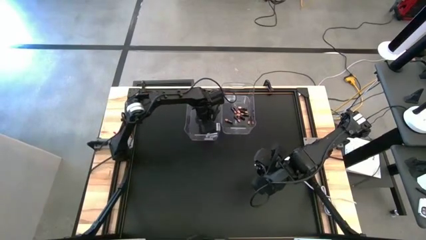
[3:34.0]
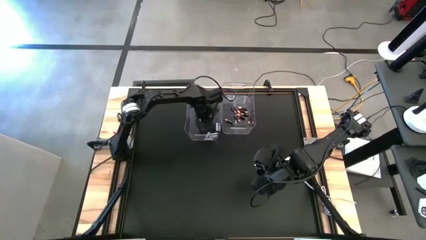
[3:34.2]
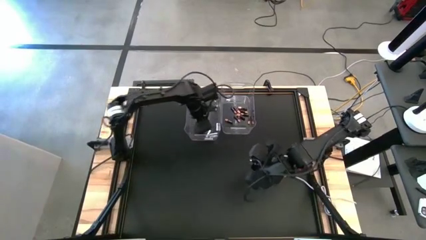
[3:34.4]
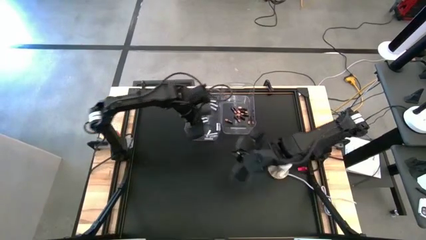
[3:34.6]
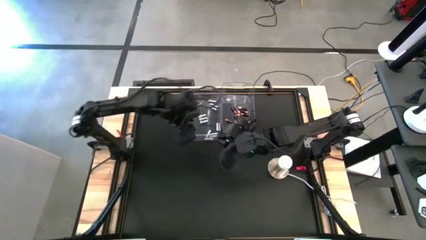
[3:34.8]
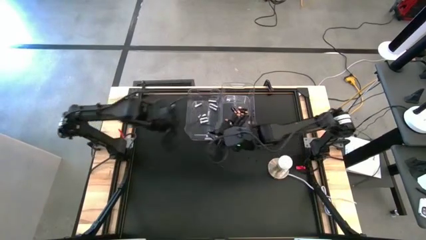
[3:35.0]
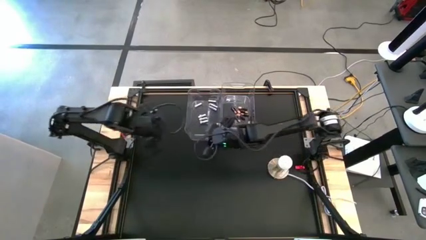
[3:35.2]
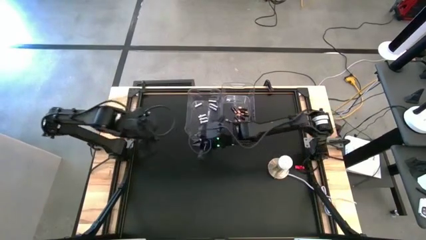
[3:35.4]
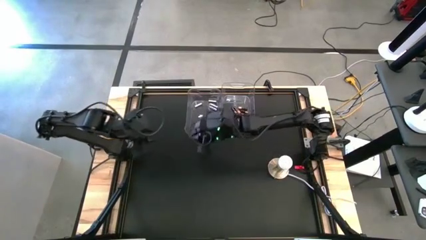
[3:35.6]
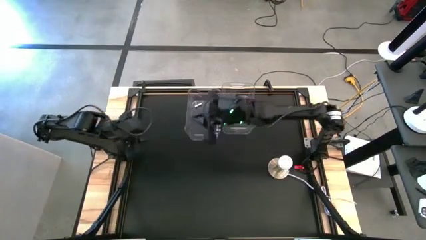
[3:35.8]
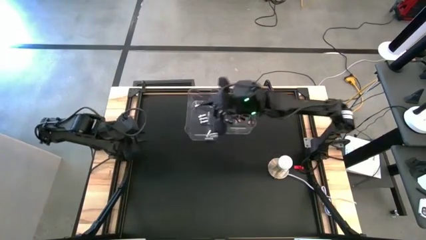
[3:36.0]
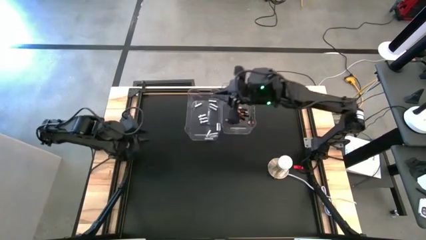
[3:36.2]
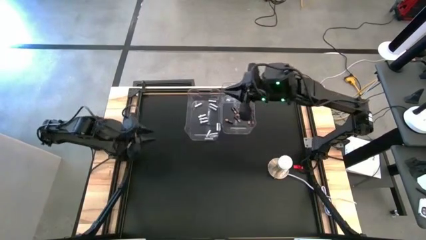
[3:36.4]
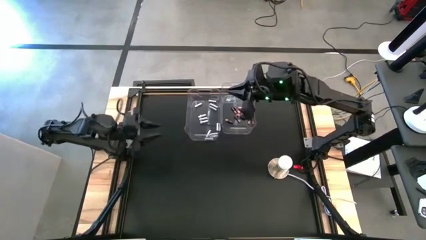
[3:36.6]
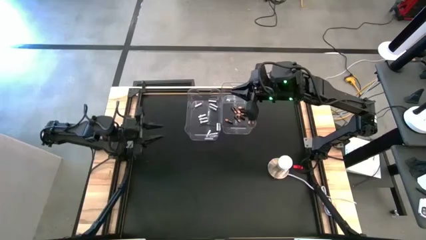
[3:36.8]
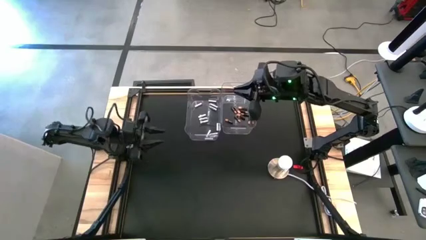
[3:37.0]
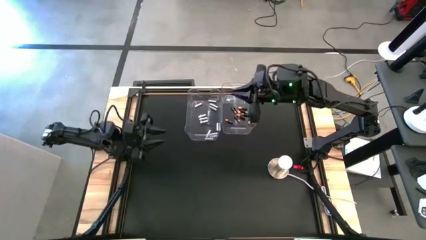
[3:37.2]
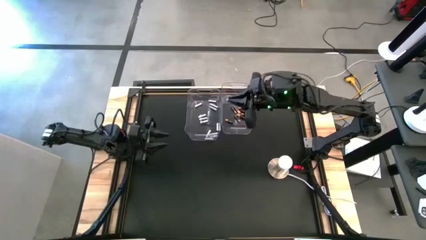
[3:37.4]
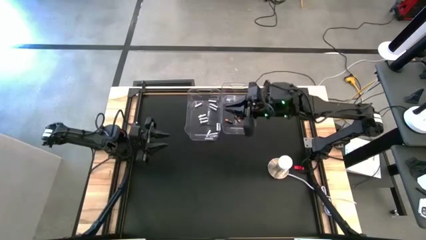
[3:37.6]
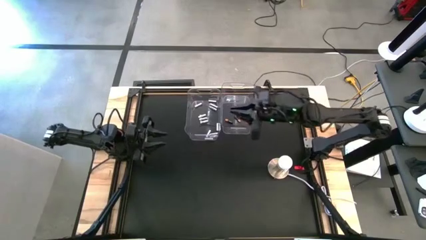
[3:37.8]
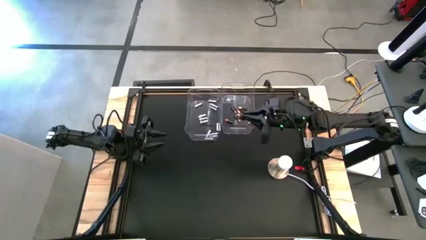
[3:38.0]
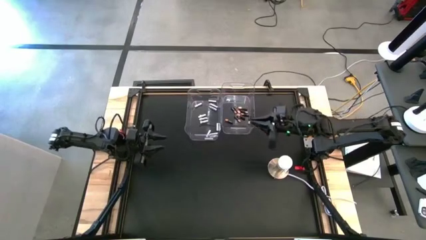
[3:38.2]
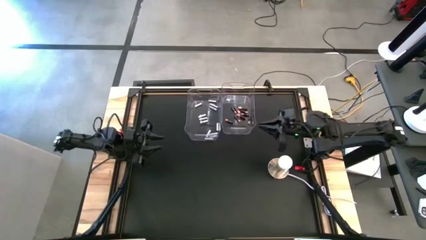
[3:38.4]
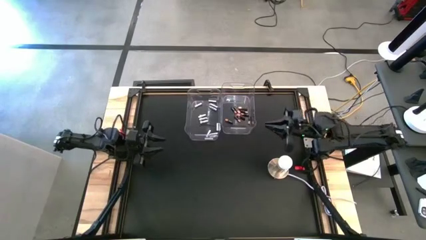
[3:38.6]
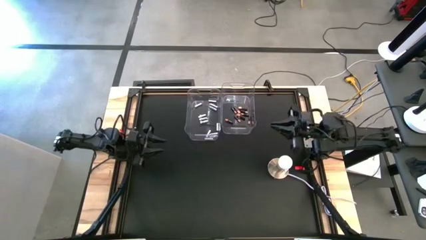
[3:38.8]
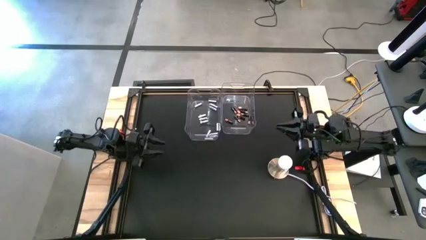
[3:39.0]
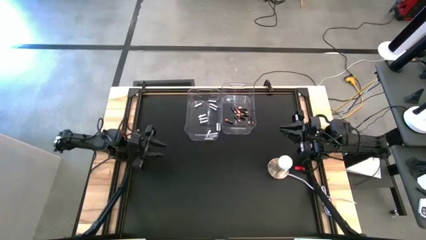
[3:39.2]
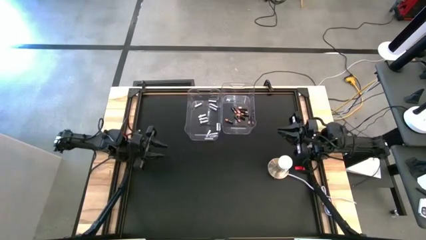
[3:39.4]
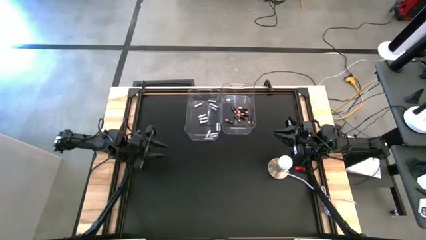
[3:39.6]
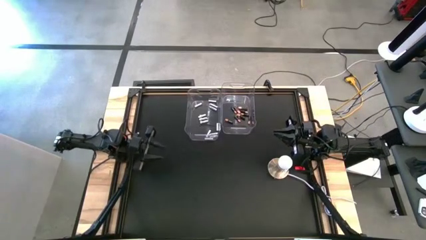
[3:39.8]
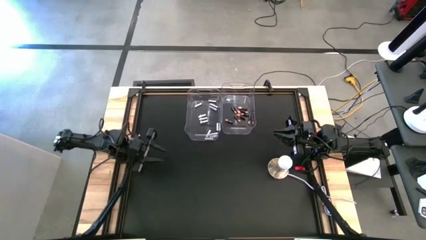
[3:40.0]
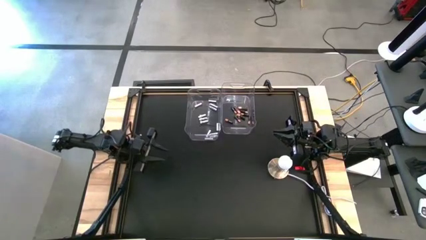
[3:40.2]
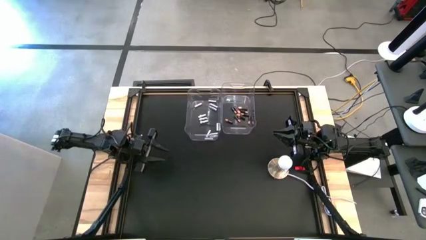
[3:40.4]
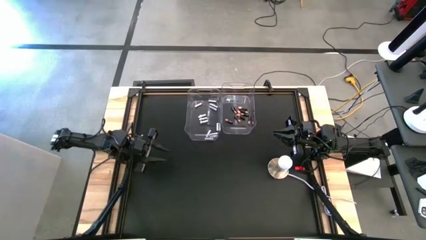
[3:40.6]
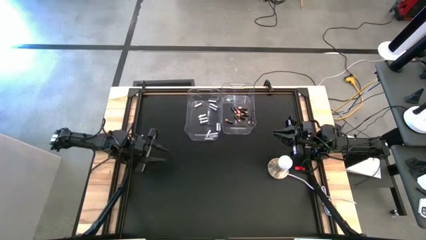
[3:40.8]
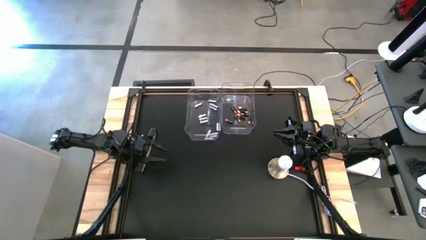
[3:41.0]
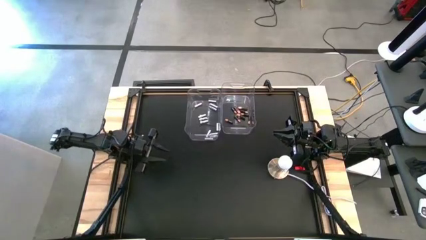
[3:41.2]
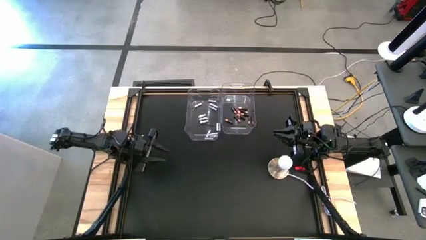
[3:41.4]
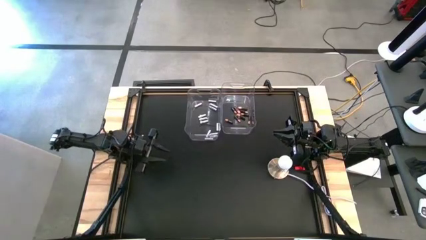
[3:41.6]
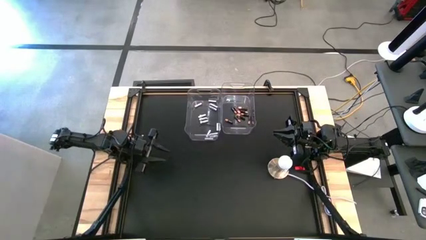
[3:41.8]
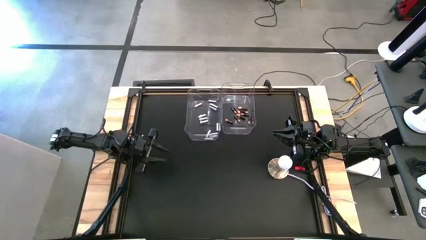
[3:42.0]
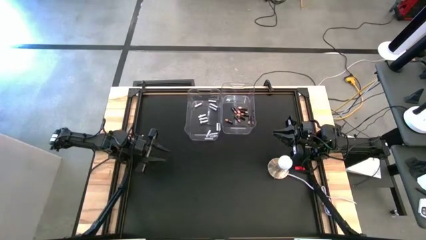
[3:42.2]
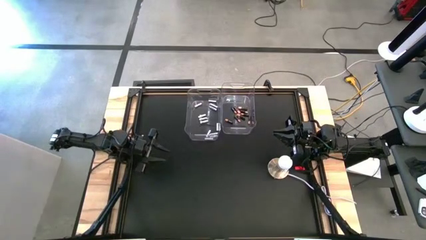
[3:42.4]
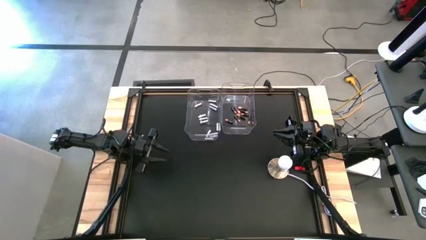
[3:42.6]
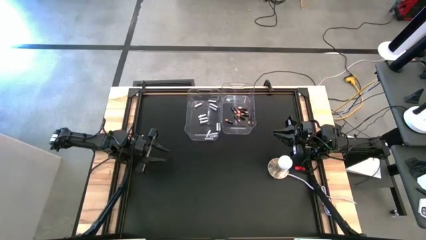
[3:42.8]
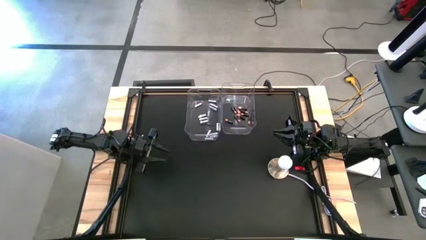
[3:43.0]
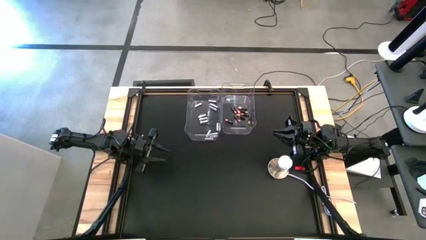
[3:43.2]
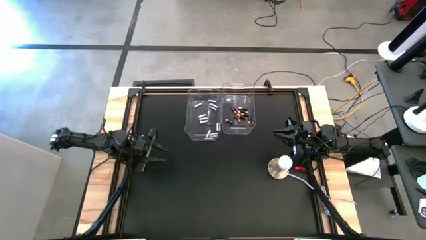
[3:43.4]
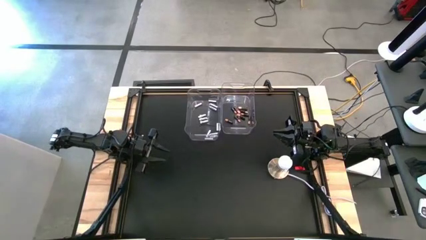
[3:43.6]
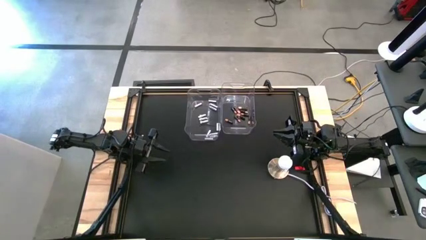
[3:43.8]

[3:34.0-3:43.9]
Task: Sort batteries
Return to Home Position

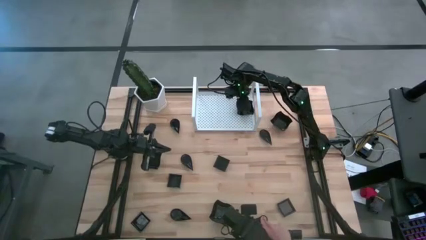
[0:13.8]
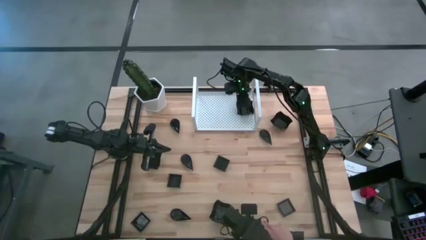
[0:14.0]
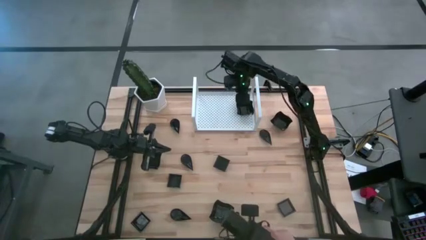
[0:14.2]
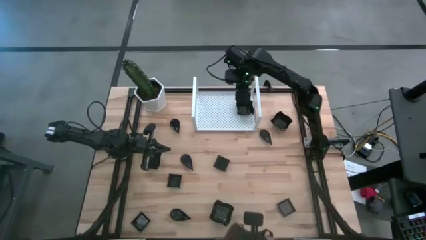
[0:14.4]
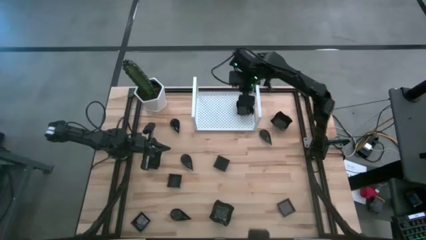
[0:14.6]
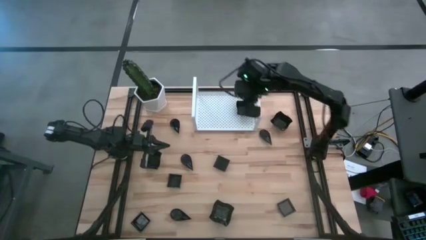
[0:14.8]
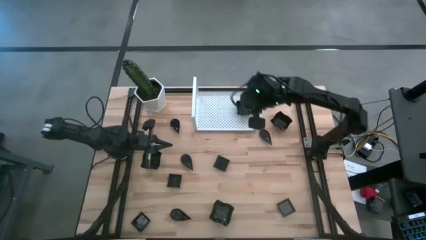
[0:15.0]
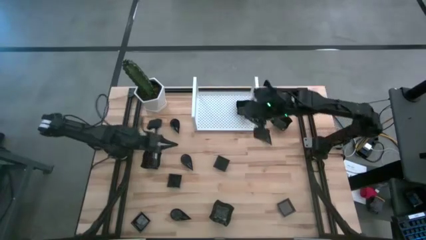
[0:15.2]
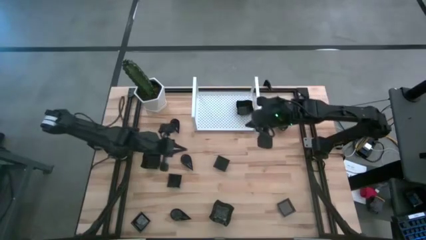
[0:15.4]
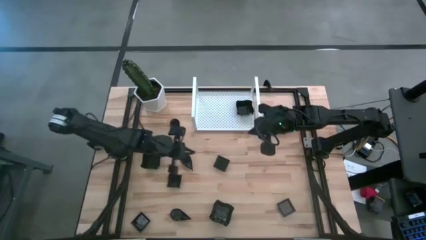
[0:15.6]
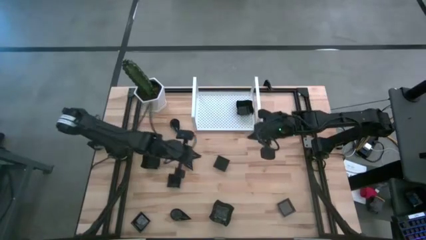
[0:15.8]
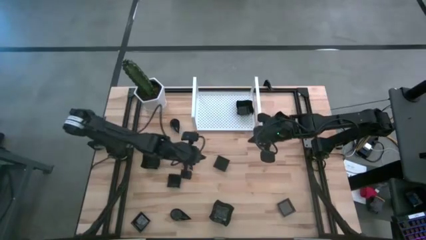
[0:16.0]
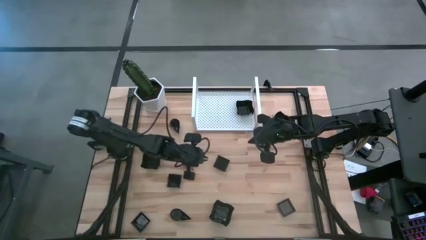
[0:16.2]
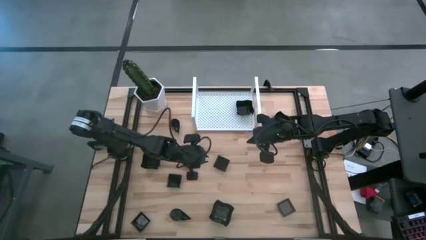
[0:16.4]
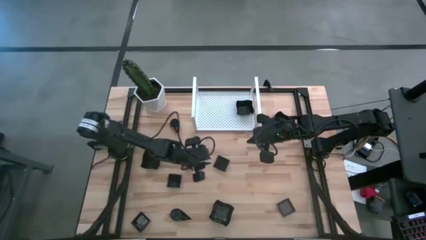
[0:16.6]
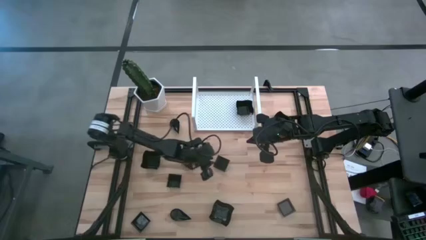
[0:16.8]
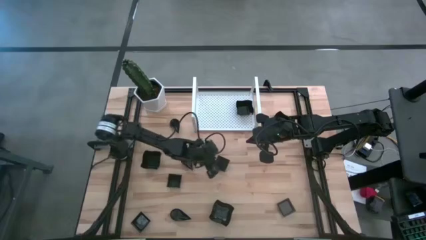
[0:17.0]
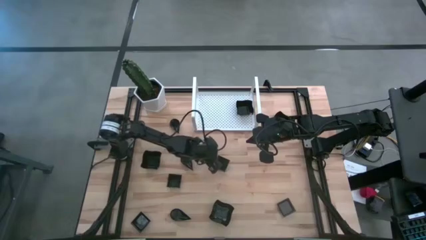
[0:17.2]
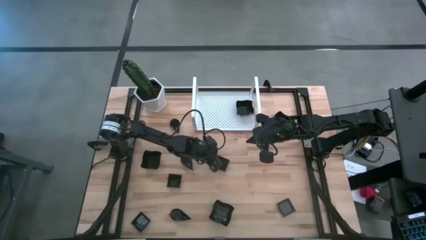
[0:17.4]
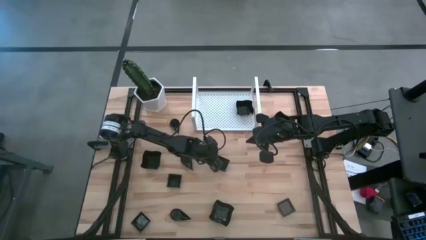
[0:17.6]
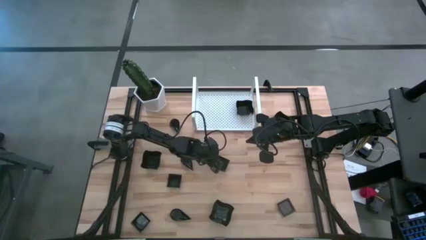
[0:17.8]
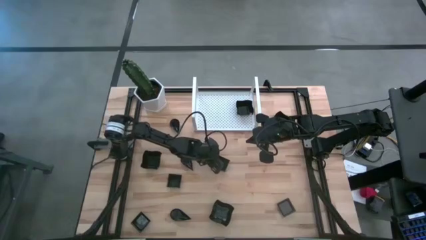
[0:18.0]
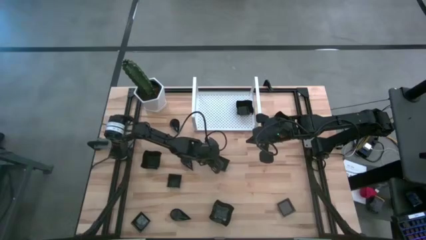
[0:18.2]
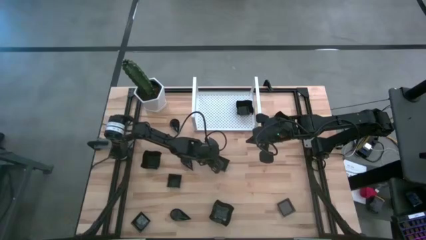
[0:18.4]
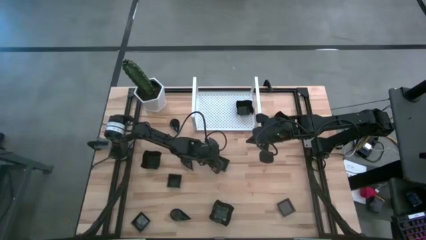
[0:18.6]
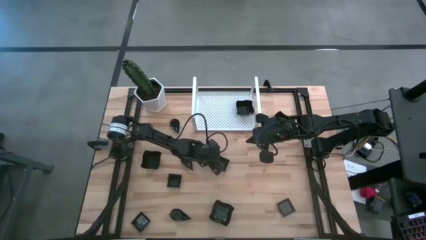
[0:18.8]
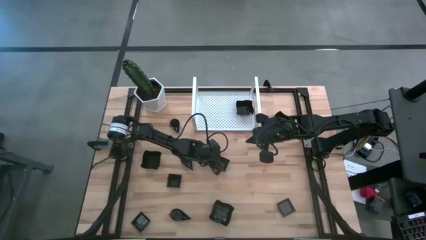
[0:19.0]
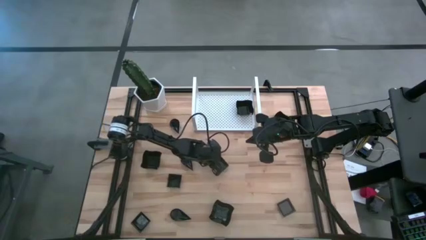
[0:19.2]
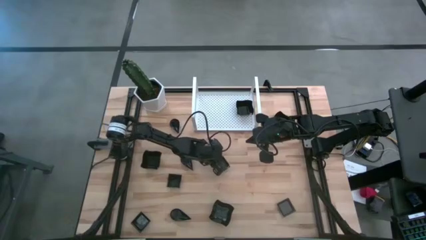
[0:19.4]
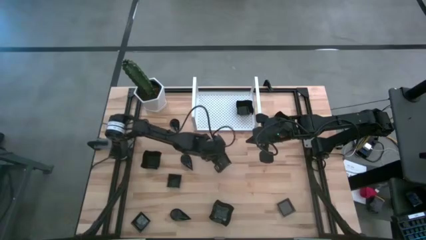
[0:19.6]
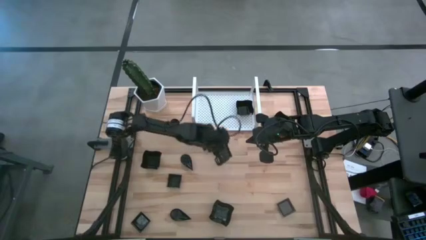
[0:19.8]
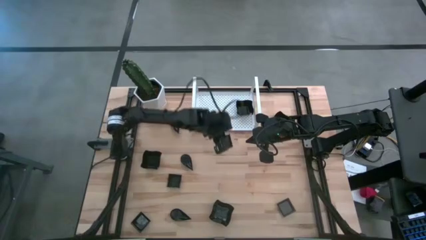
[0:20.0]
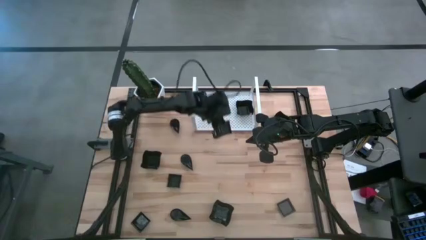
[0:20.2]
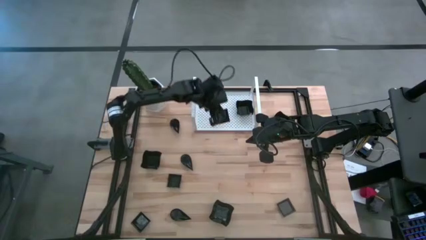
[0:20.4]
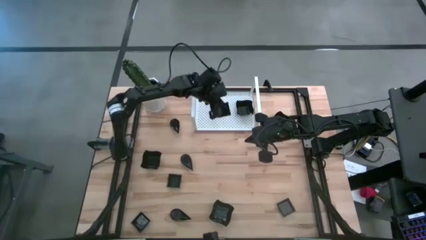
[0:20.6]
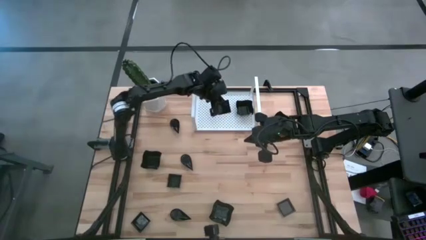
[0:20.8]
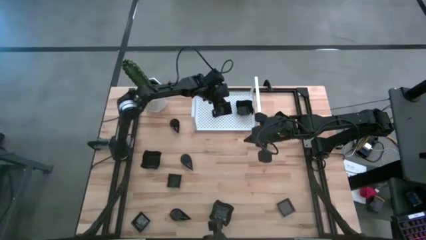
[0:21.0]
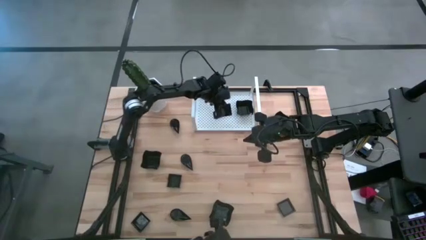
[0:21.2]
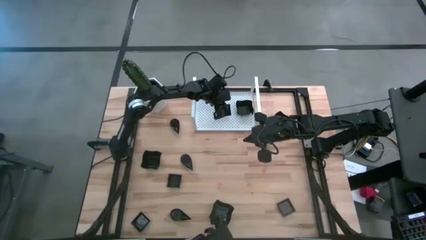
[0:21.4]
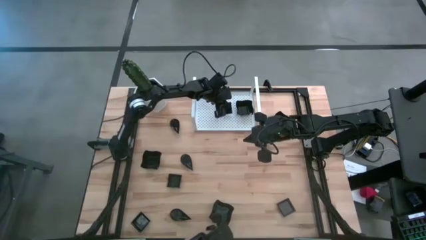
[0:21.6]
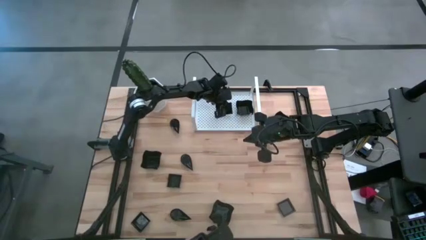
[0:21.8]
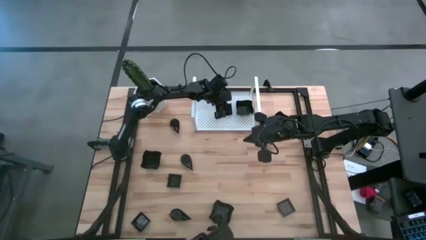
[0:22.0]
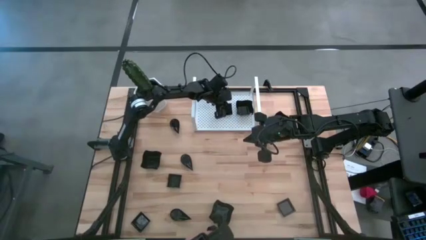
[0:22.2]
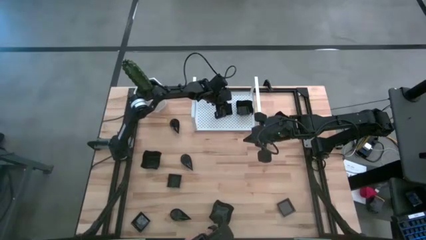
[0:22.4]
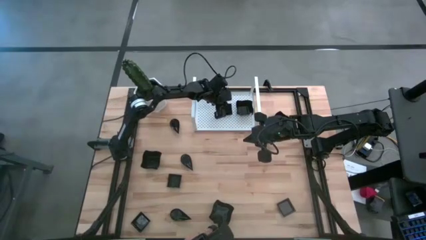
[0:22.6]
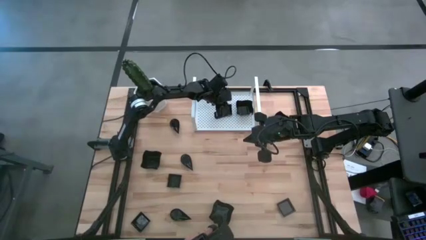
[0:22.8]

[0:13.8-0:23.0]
Task: Pick & Place Mini shaped plates
Put the black square plate on the shelf
